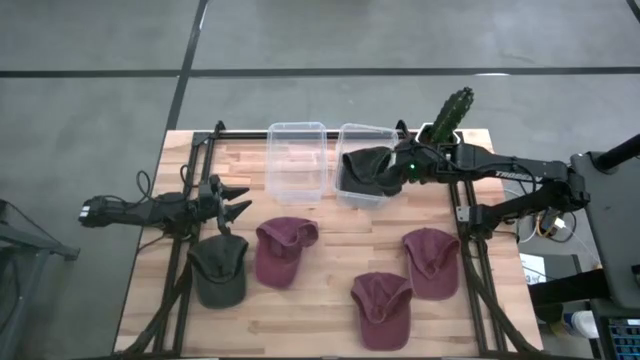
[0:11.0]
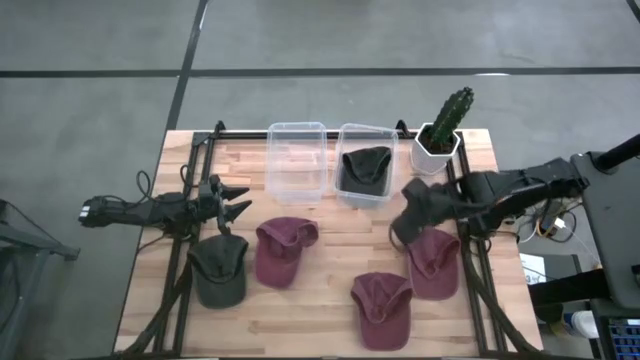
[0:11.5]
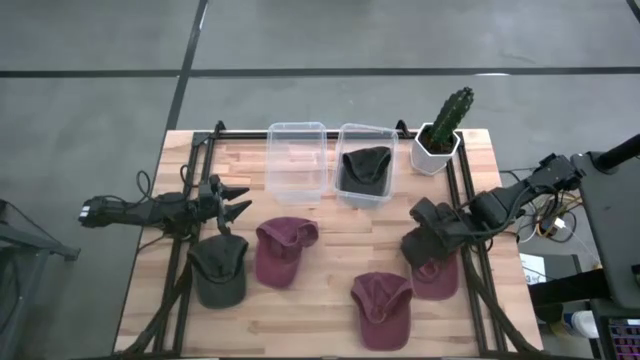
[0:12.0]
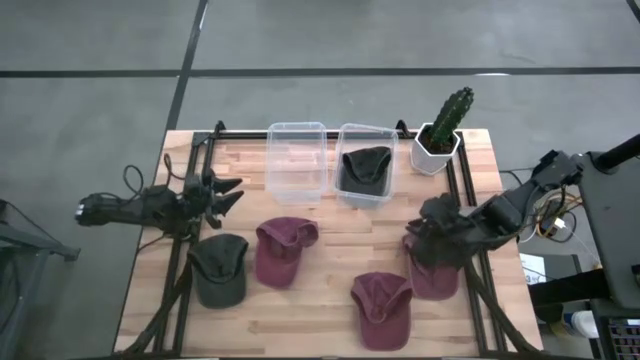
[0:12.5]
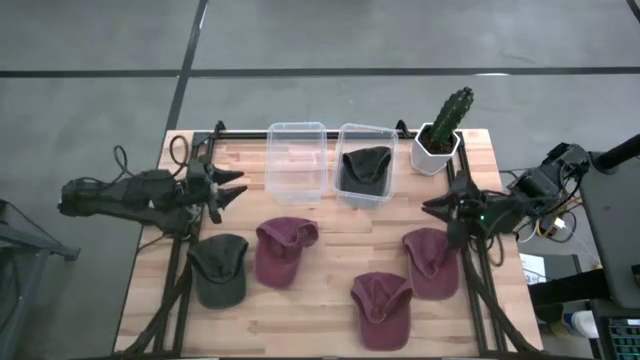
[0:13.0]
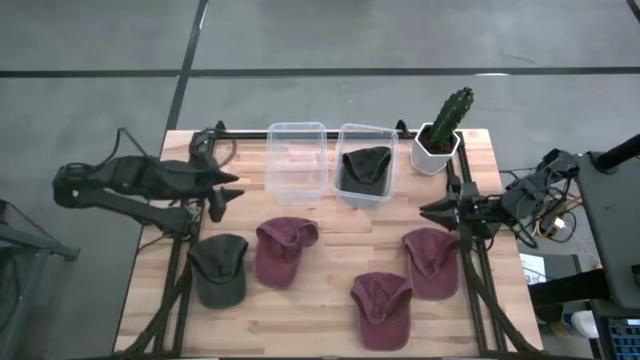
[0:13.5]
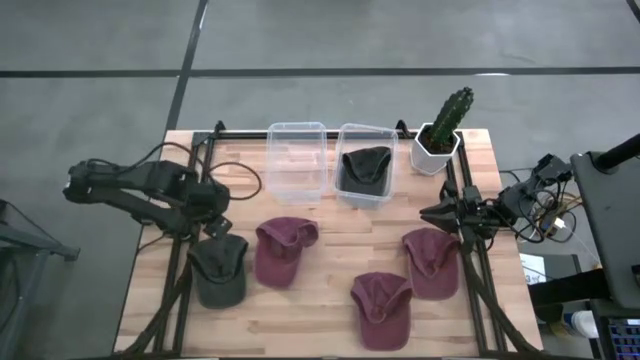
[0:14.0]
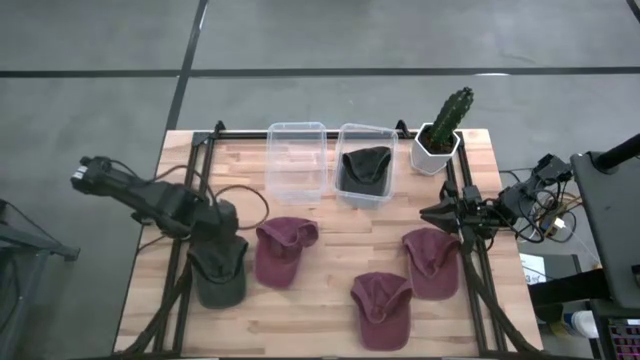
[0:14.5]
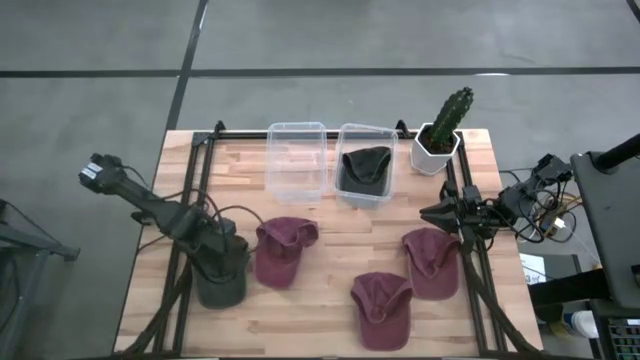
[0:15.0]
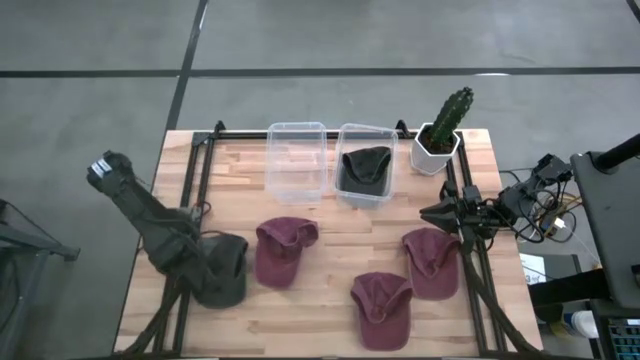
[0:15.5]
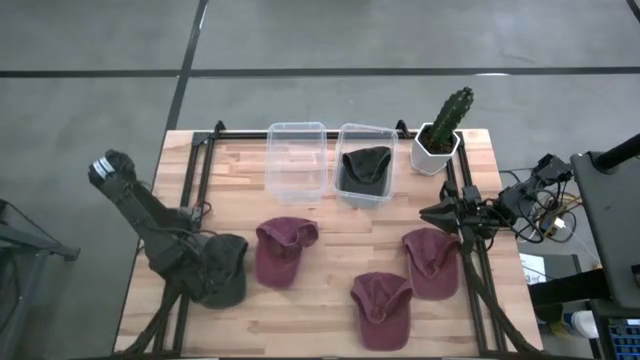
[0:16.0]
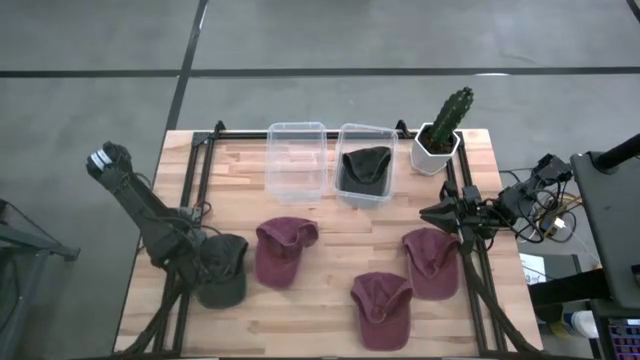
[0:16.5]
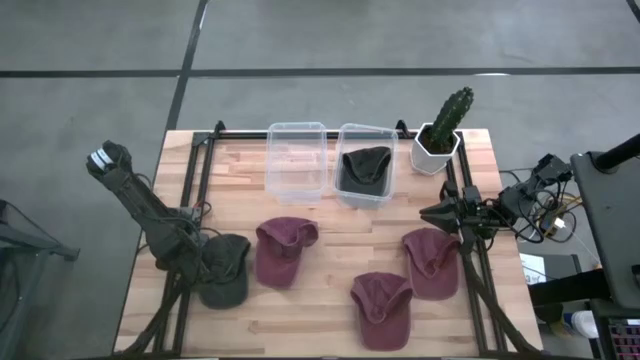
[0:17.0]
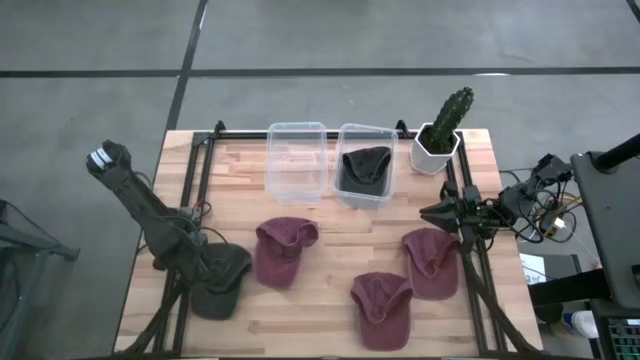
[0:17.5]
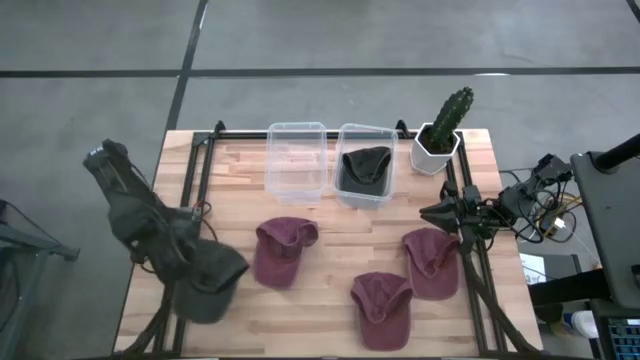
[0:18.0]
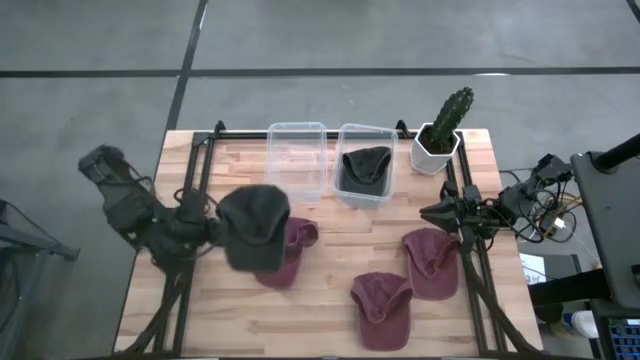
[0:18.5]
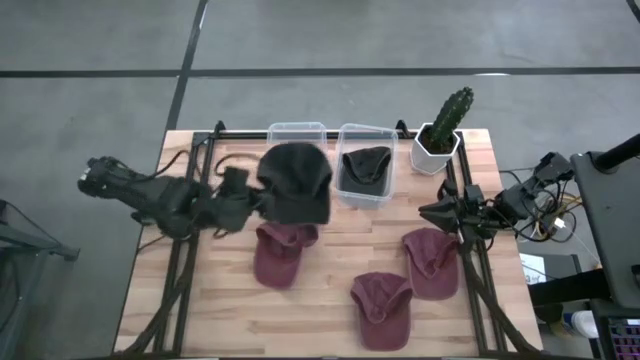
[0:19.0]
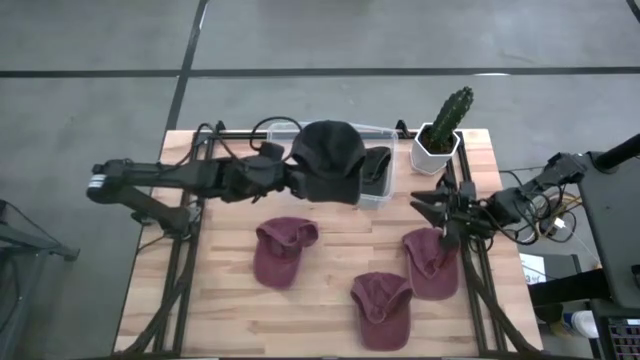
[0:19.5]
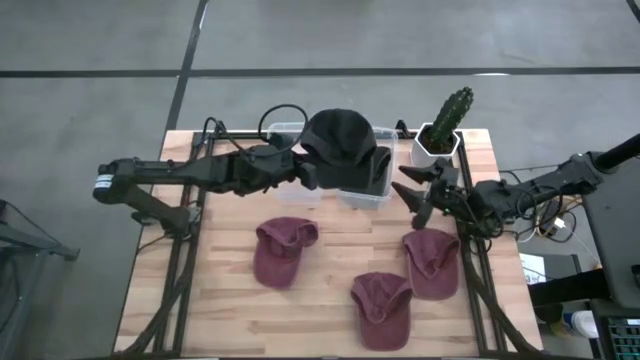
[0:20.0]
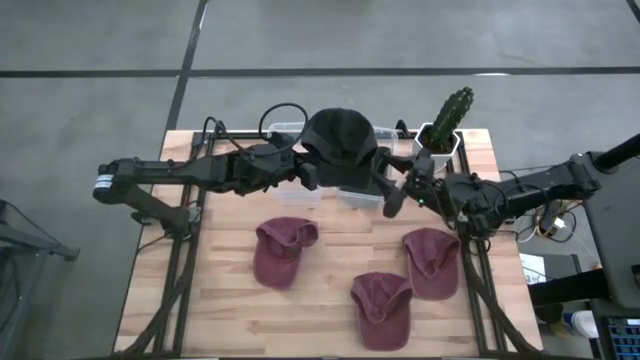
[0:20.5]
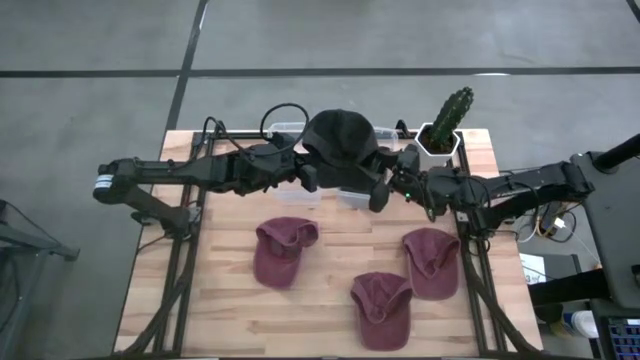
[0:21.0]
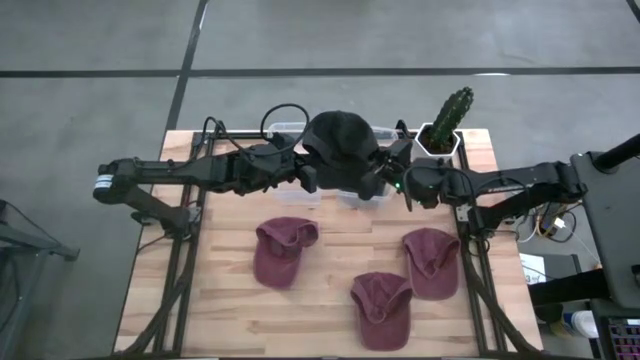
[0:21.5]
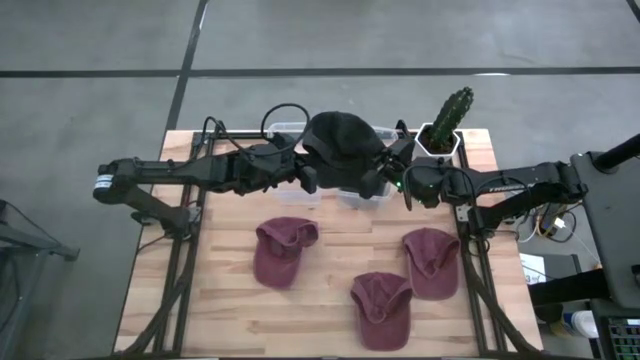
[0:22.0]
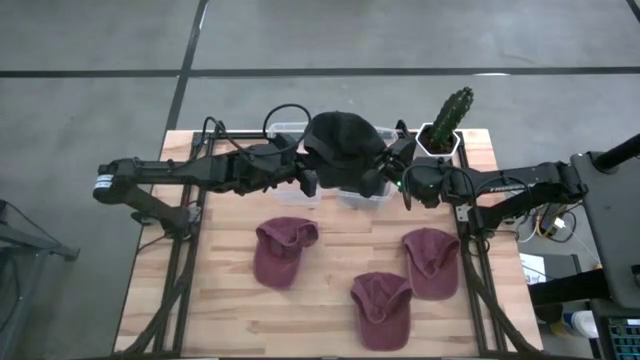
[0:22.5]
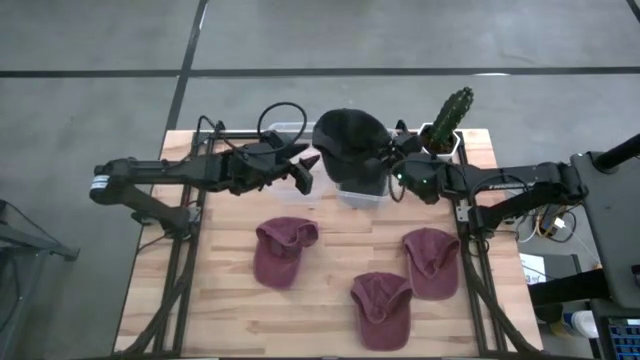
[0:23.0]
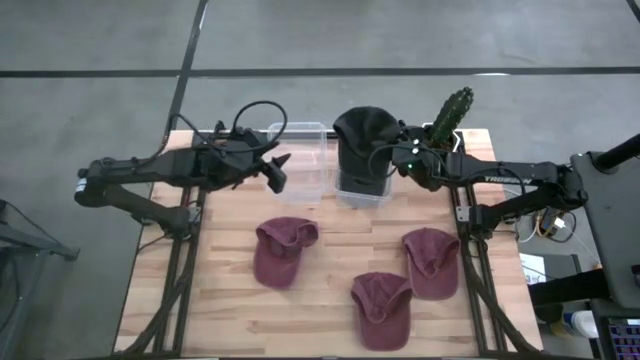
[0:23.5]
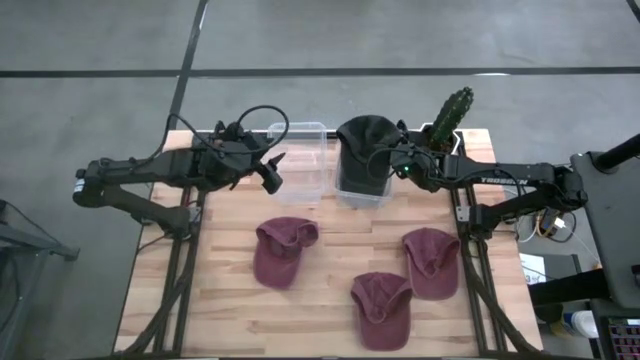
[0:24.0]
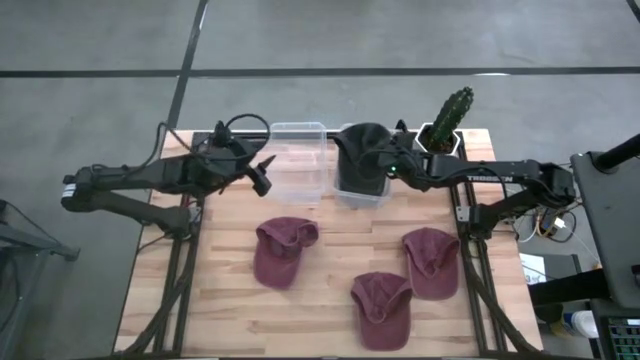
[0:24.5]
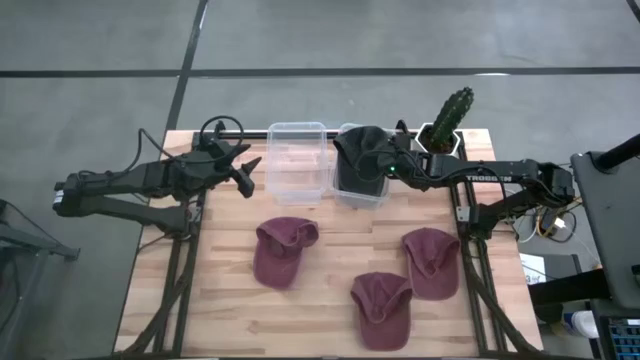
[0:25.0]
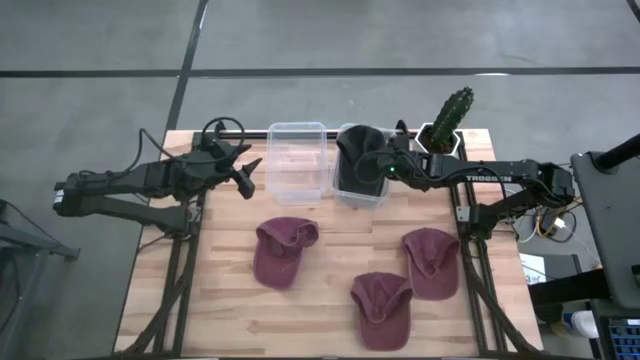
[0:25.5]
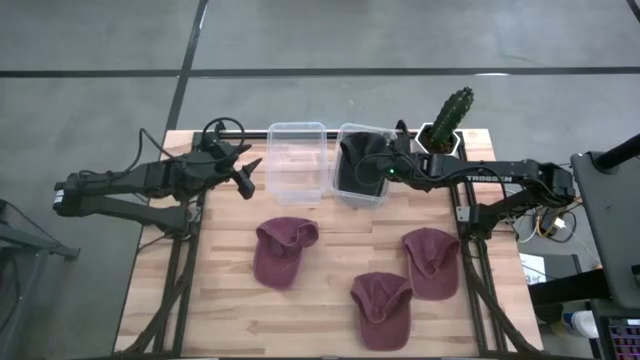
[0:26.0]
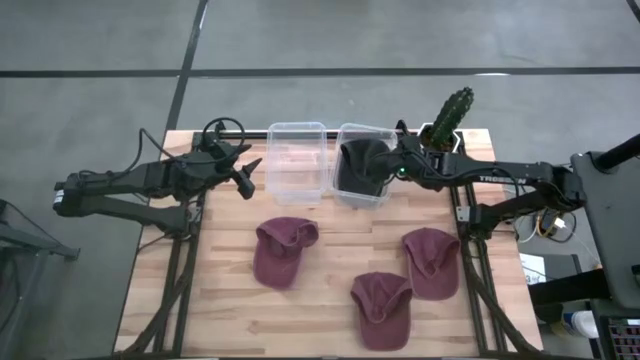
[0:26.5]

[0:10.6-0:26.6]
Task: Pick & Place hat
Put the black cap into the right transparent bin

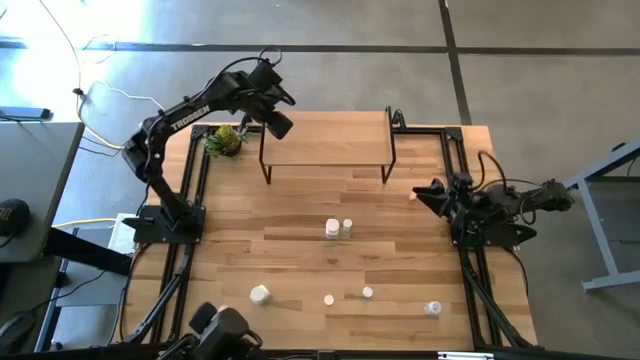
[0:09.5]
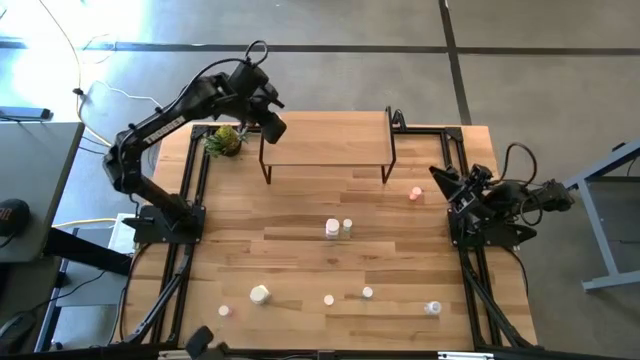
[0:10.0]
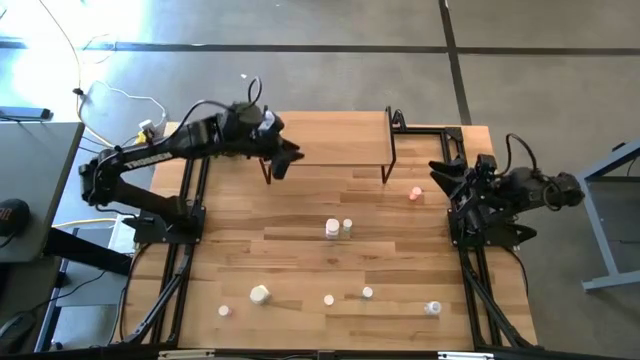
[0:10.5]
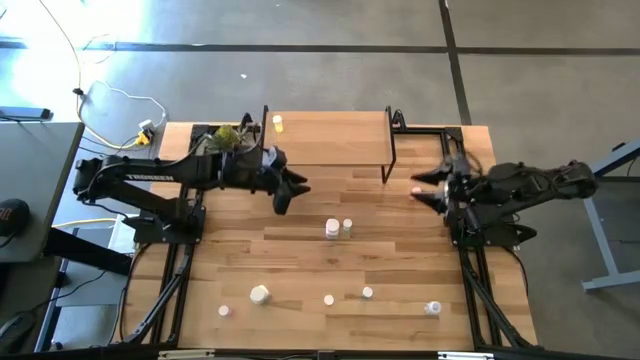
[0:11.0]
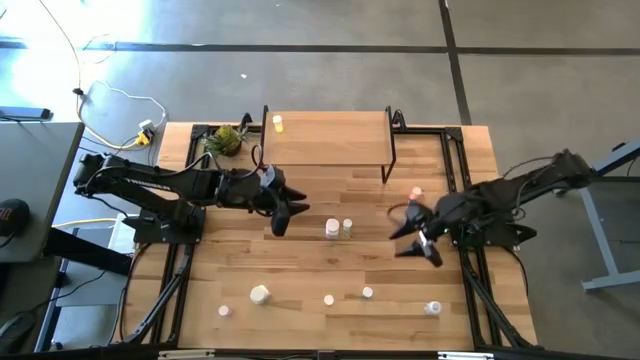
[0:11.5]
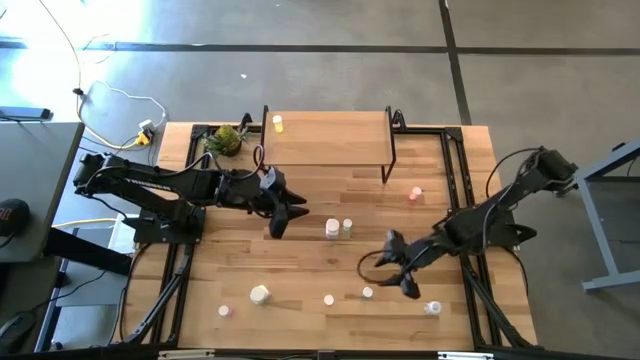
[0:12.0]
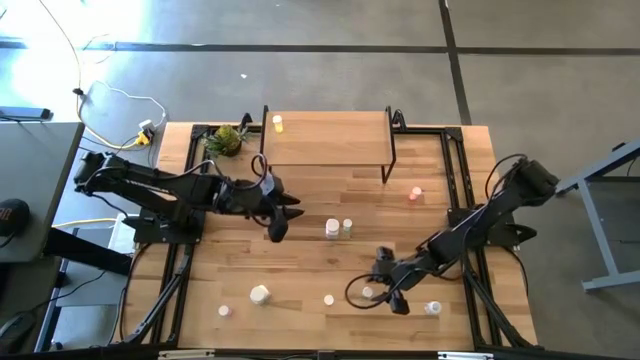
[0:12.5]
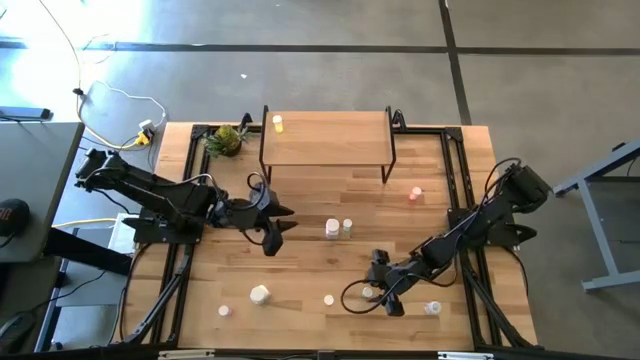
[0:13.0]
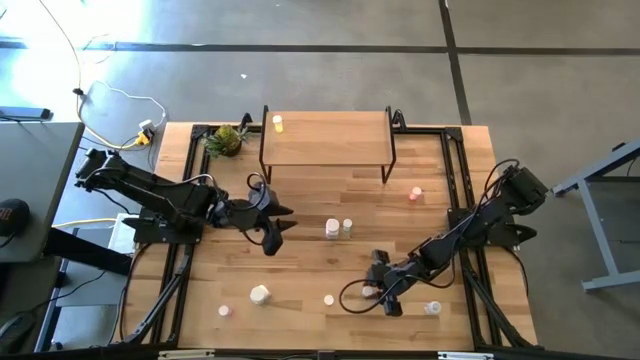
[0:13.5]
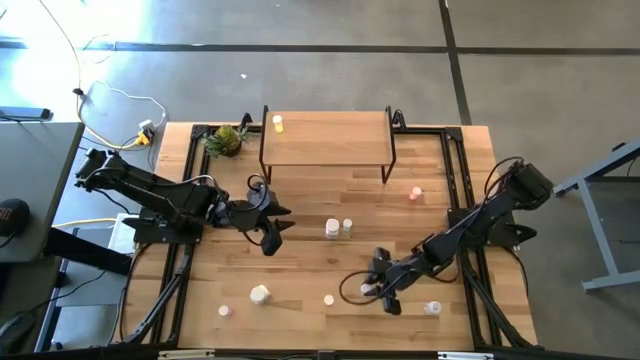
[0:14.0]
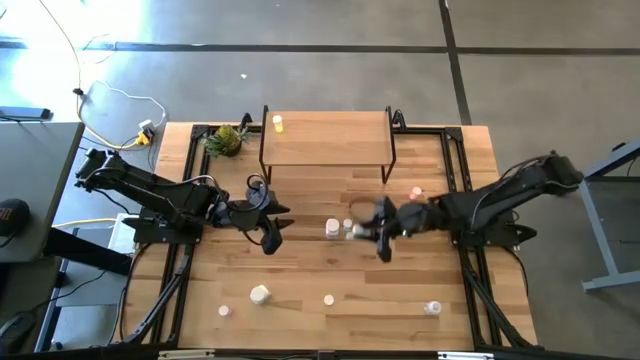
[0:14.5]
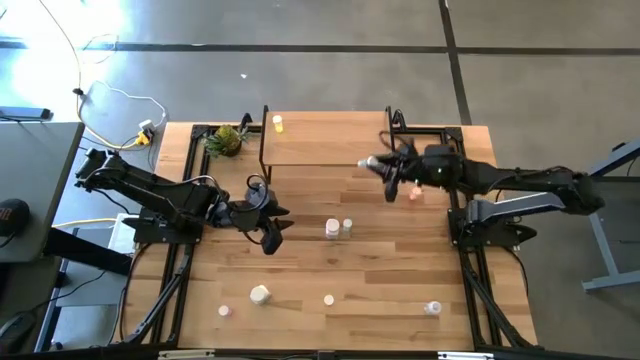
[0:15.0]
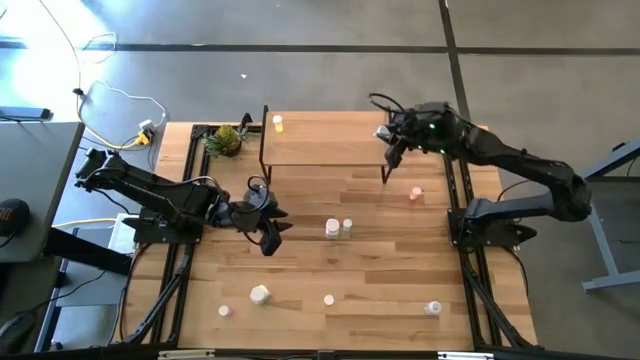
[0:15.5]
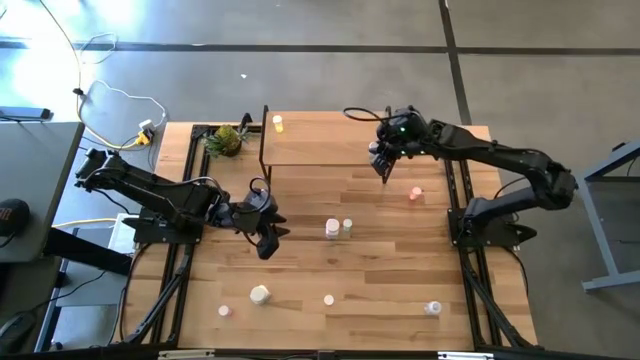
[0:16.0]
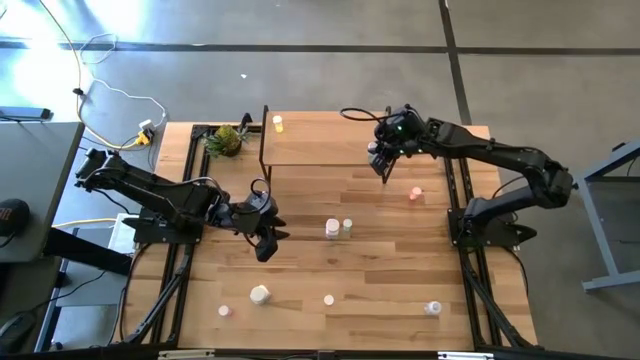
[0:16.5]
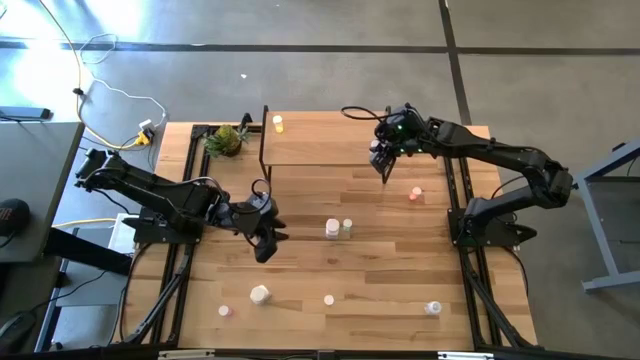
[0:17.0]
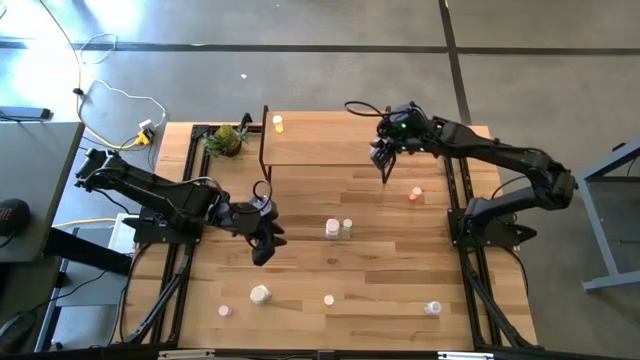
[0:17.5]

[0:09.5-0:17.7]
Task: Pick and place medicine bottles onto shelf by color
Put the green medicine bottle on the shelf
